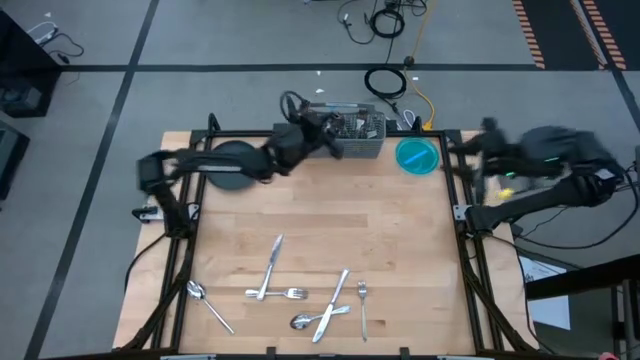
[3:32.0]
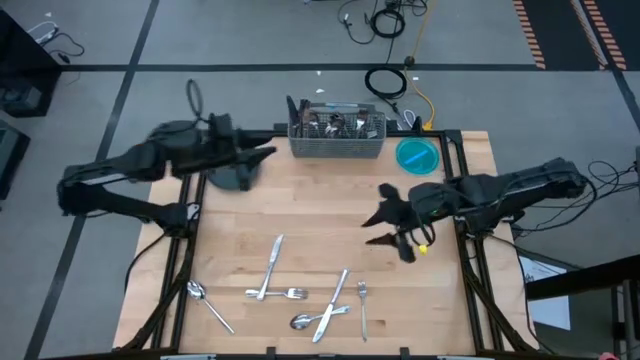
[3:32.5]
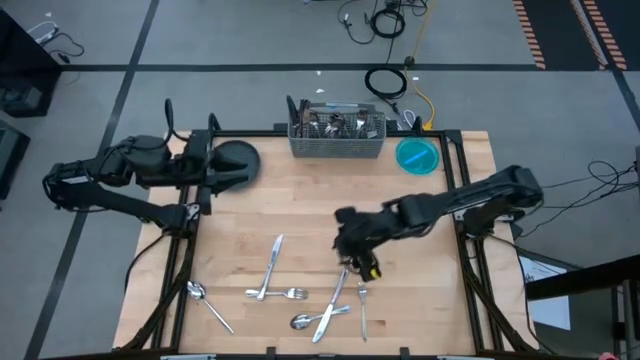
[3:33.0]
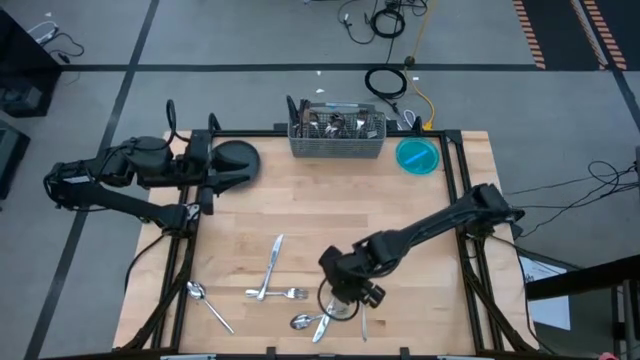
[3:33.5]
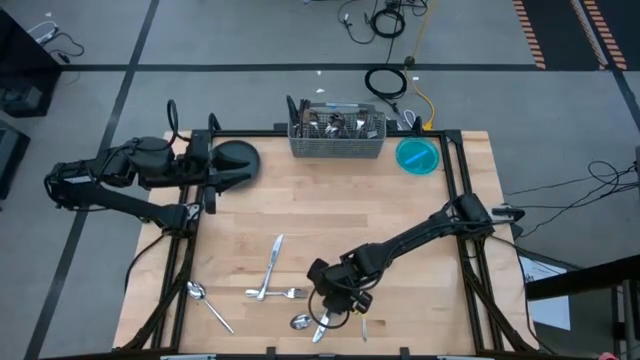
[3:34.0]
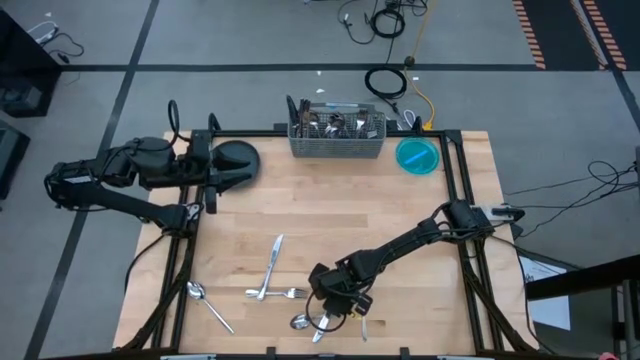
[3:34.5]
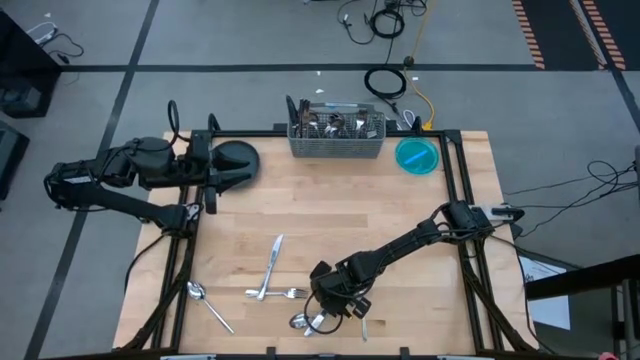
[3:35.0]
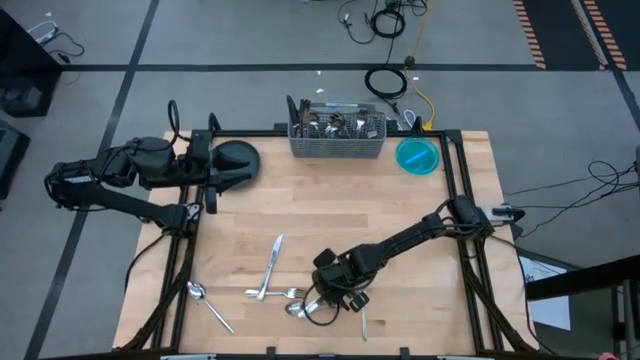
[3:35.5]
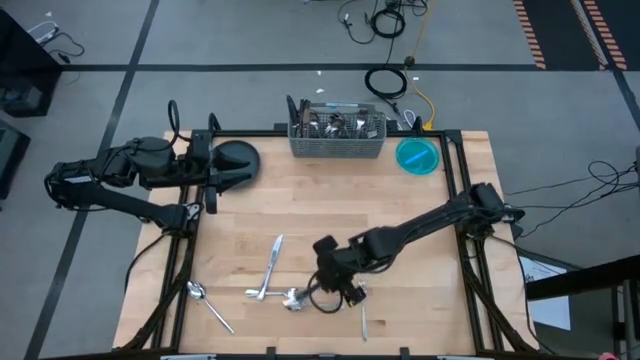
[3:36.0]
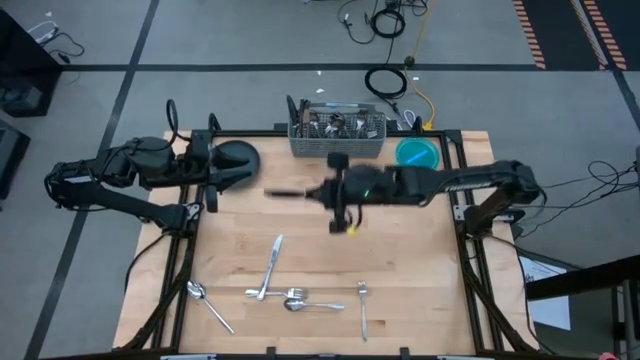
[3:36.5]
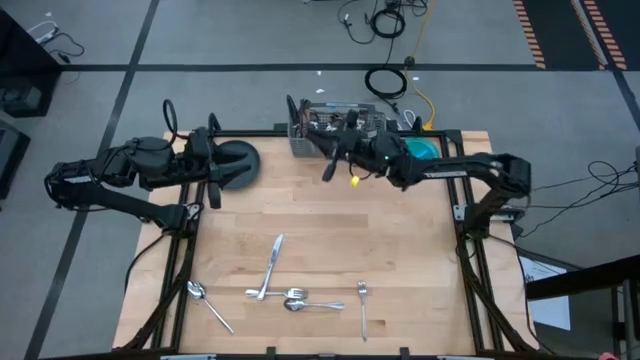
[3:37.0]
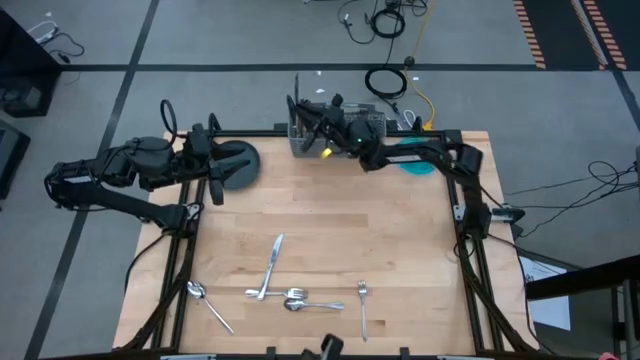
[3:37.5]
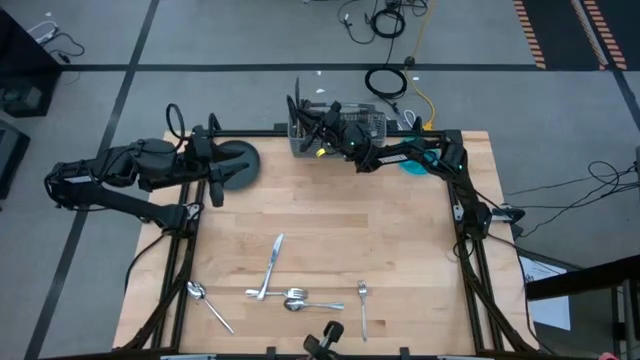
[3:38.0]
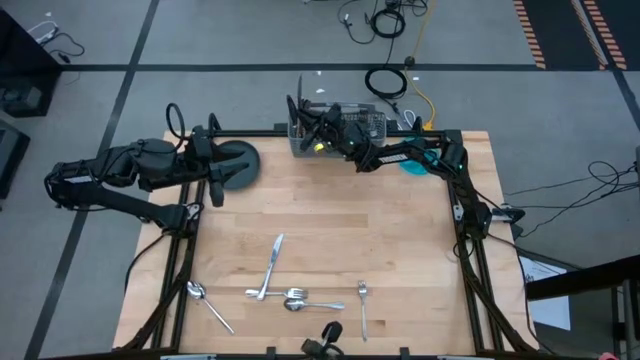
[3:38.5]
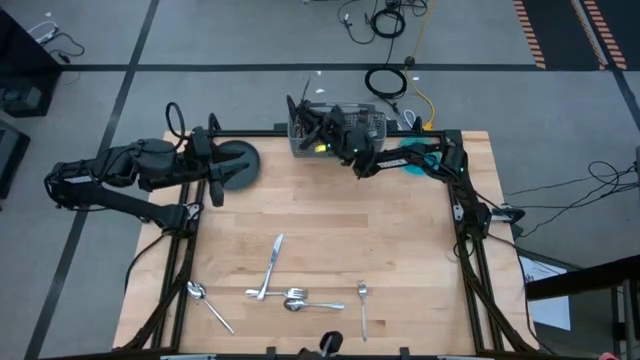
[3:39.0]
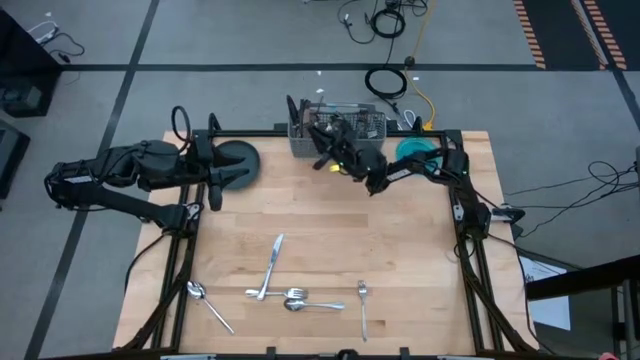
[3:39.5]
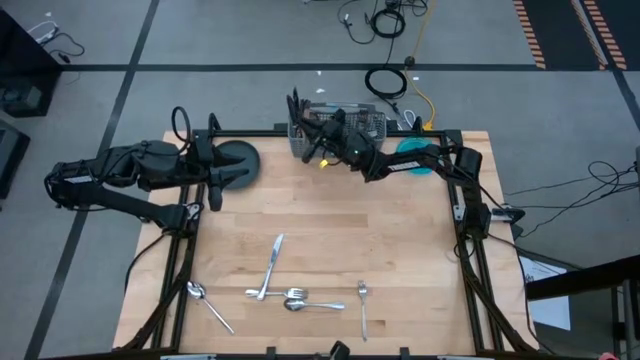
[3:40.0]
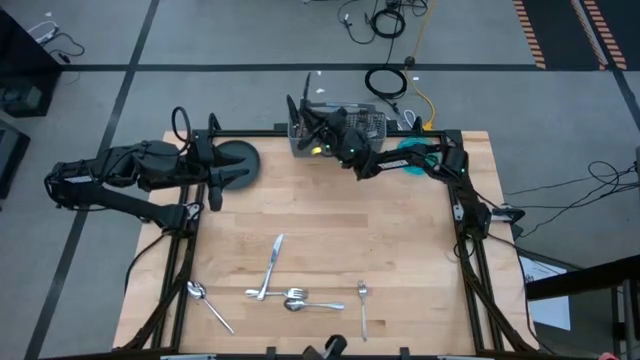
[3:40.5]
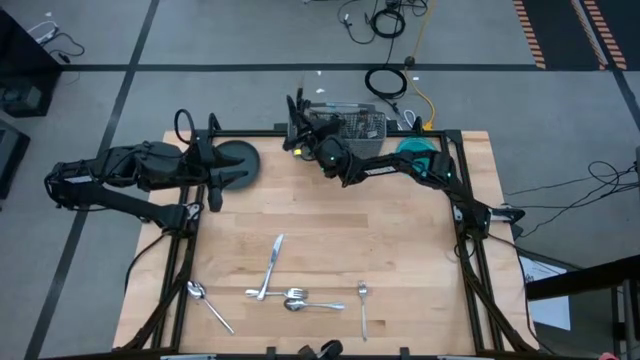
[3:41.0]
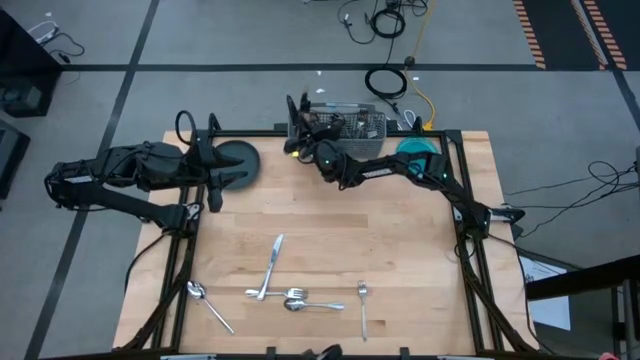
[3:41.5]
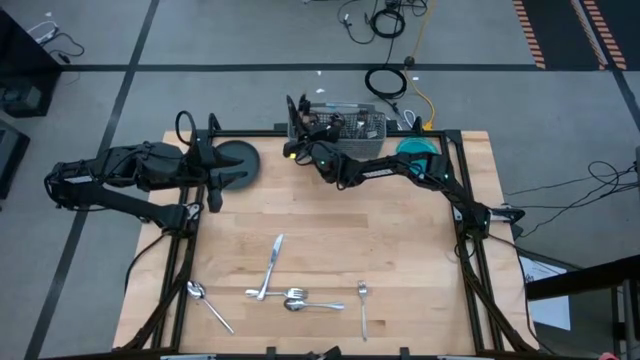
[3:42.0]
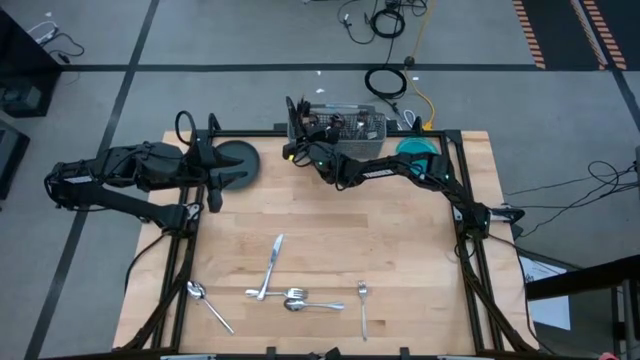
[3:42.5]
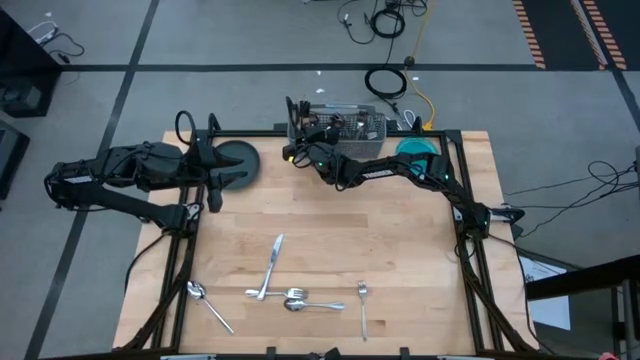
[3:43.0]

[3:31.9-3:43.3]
Task: Sort silverware
Put the table knife into the silverware organizer

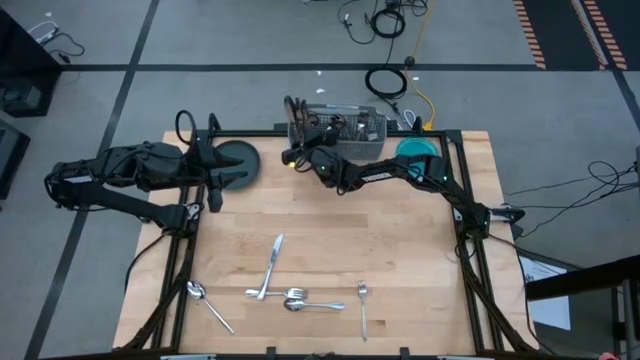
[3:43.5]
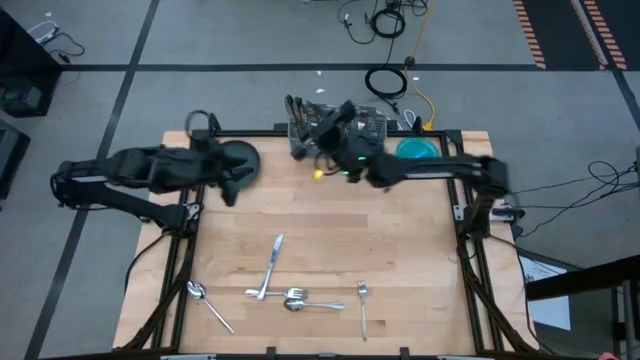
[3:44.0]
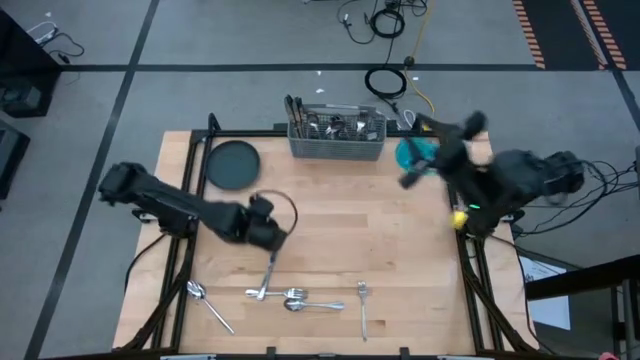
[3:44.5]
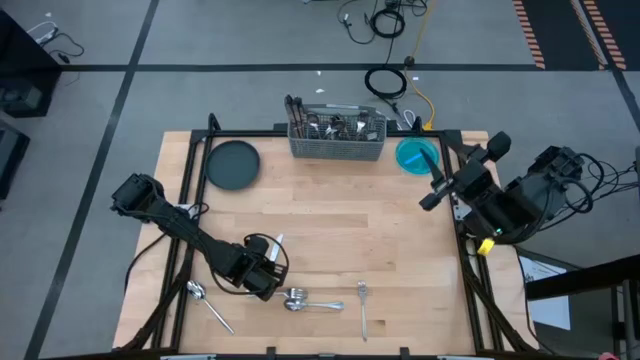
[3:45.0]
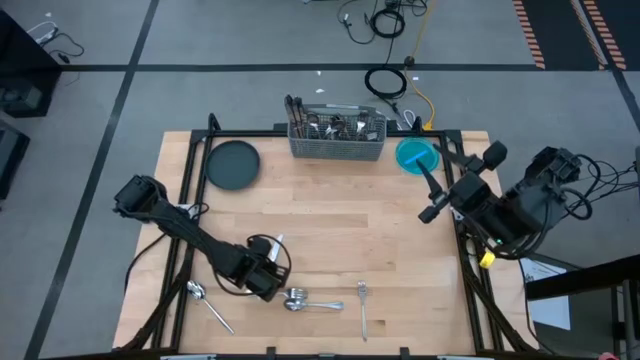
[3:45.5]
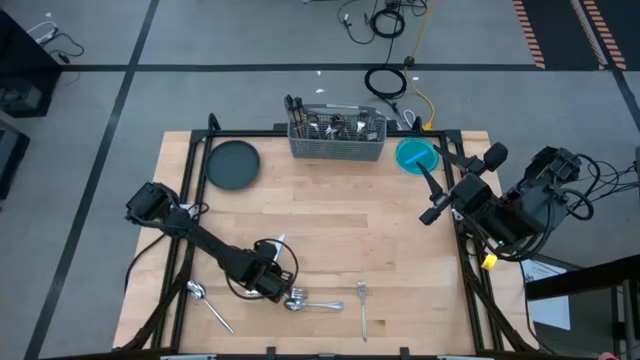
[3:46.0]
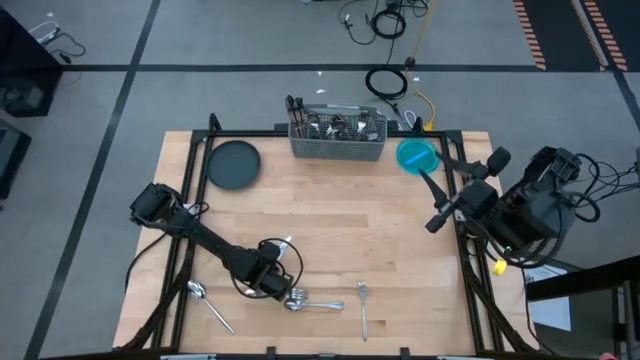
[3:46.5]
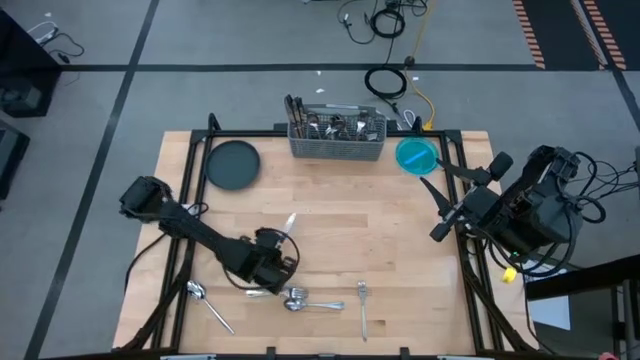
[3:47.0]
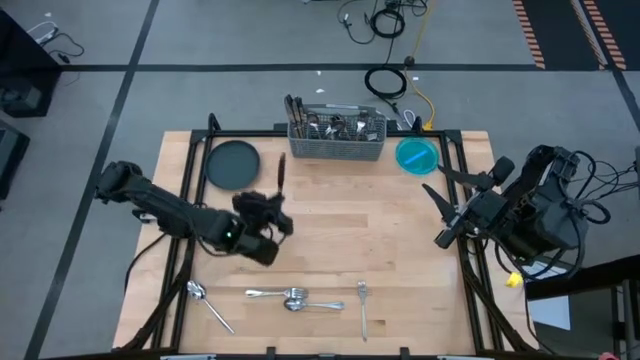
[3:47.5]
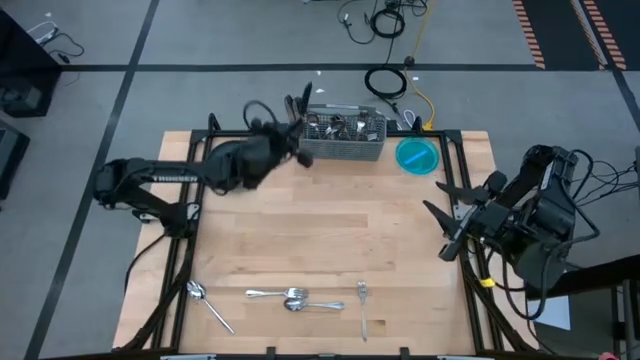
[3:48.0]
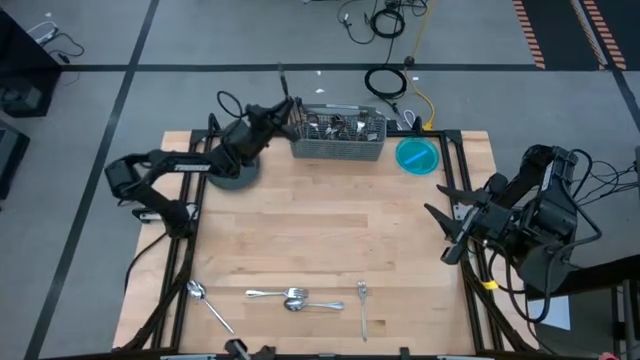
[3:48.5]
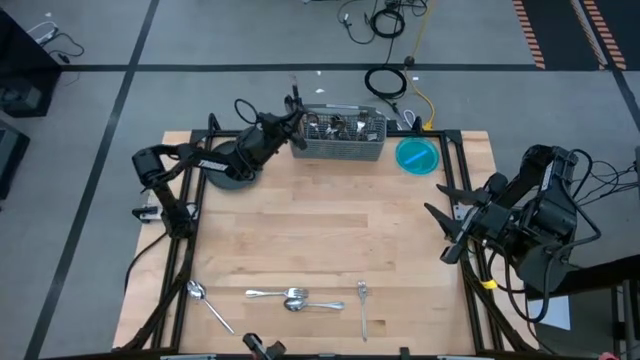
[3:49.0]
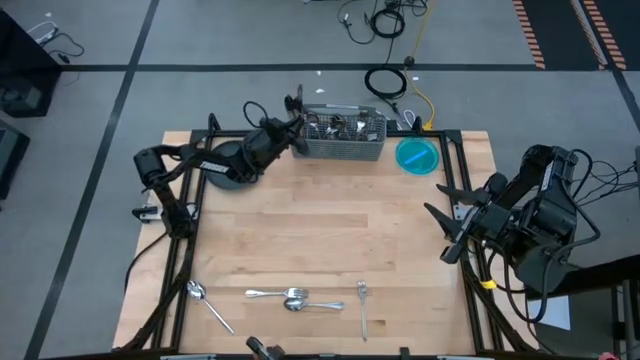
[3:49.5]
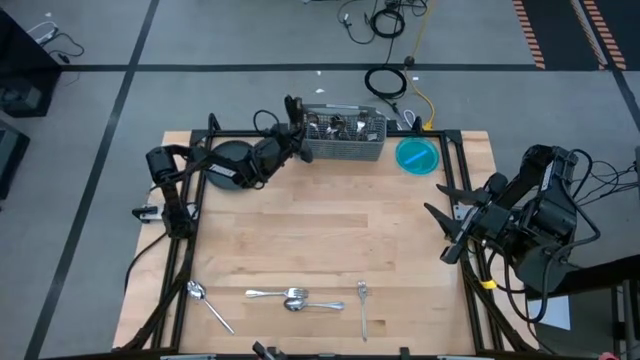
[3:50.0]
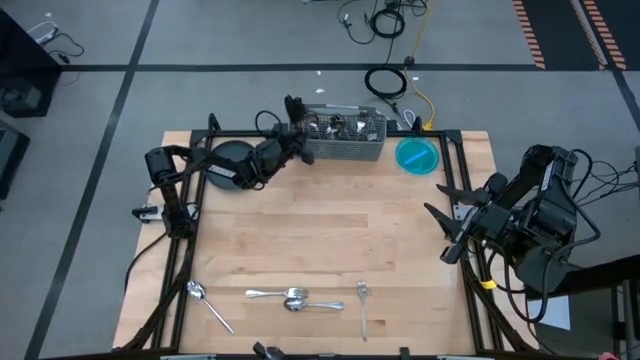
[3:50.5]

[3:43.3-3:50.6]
Put the table knife into the silverware organizer

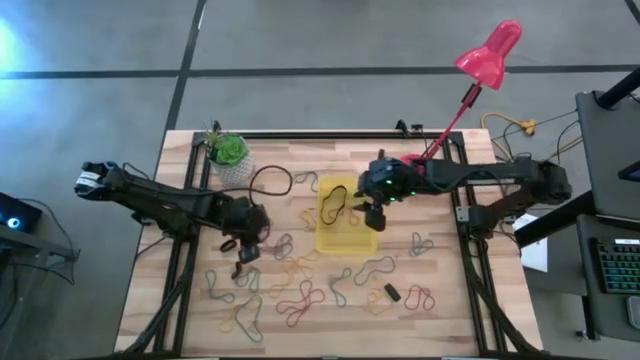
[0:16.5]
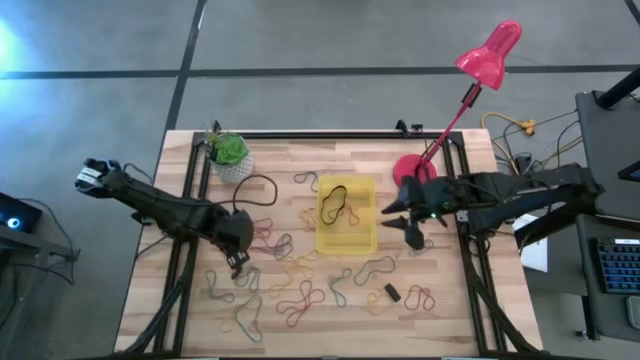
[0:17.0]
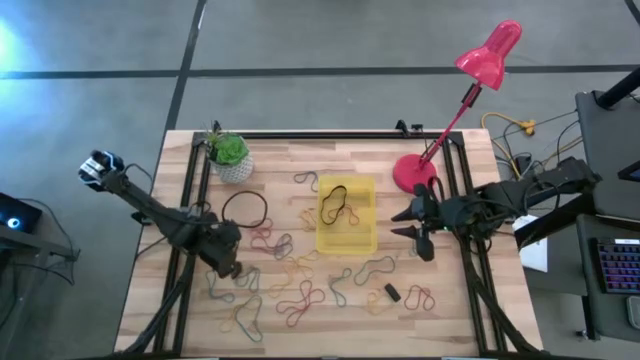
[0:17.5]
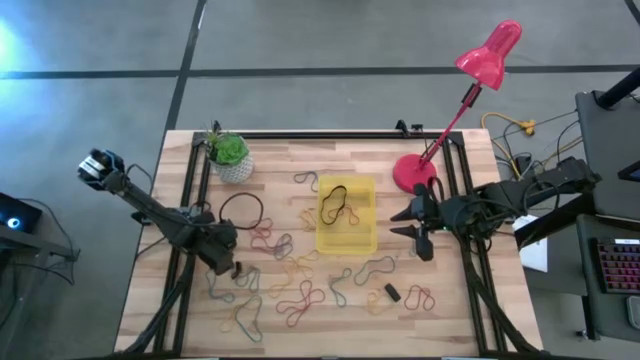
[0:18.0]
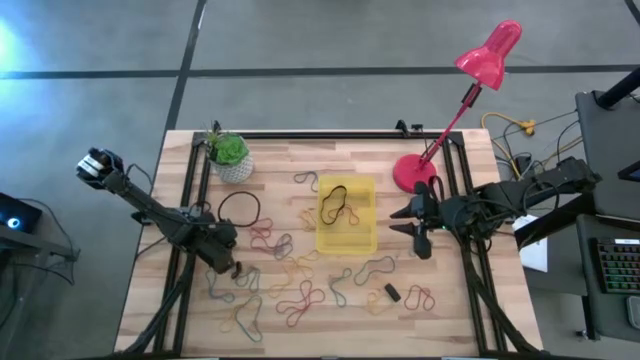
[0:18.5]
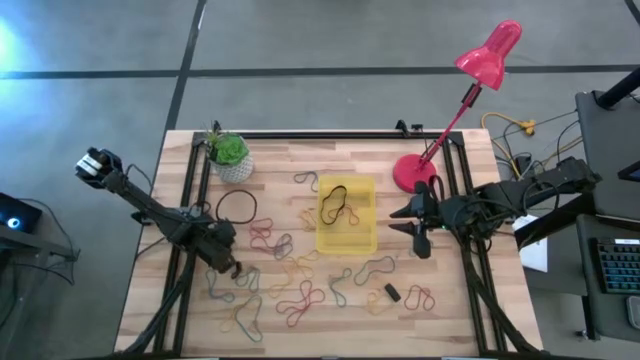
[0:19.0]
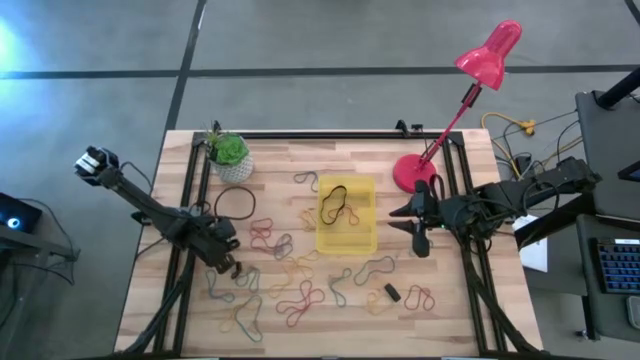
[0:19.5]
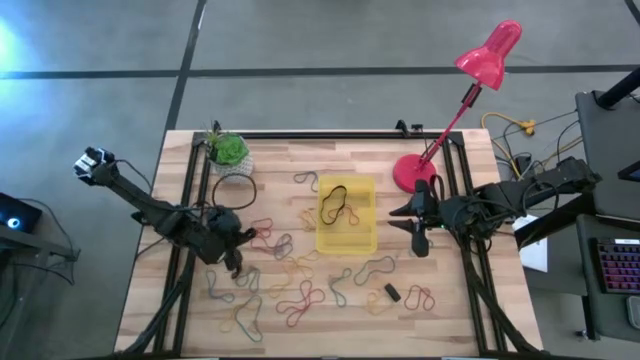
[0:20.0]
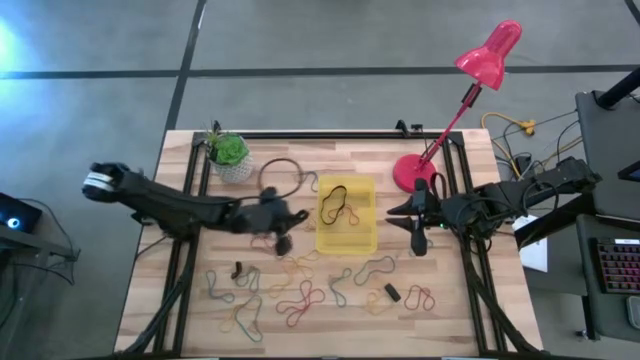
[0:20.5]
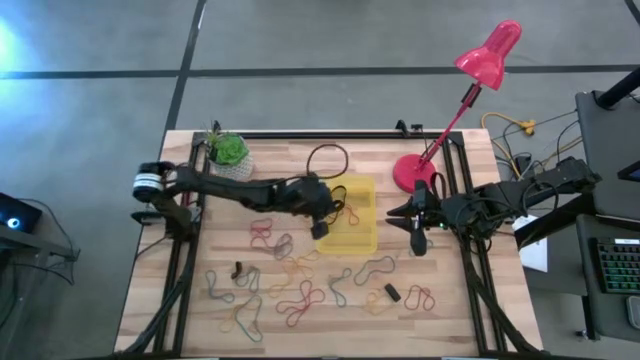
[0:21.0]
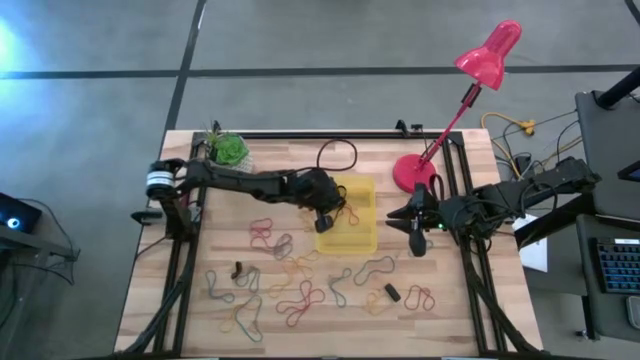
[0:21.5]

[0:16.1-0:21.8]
Task: Pick and place rubber bands into bin
Put the left black rubber band into the bin
